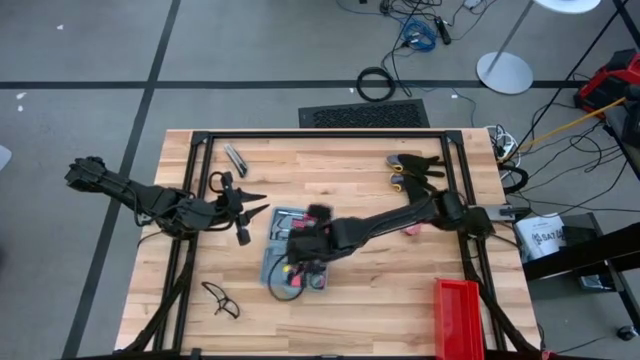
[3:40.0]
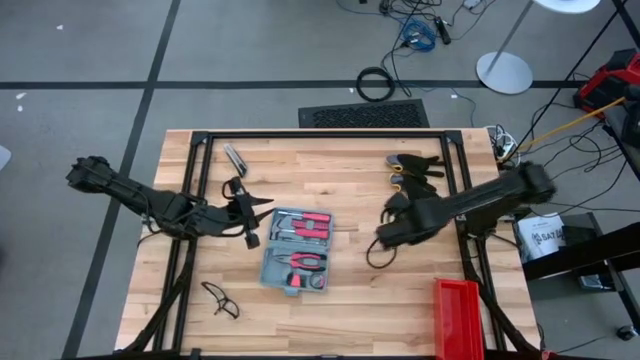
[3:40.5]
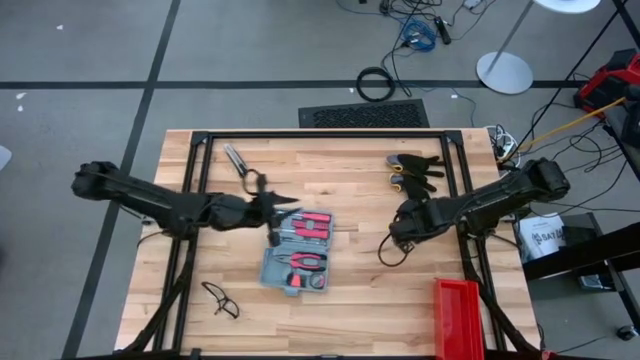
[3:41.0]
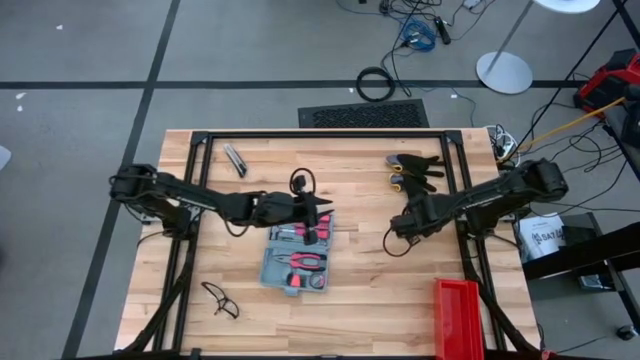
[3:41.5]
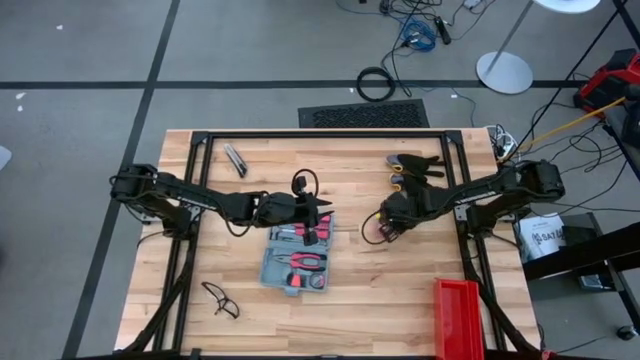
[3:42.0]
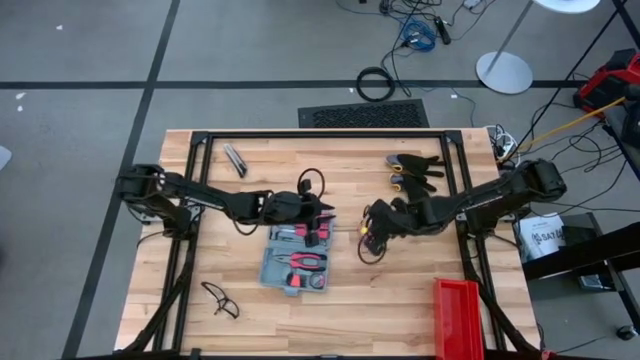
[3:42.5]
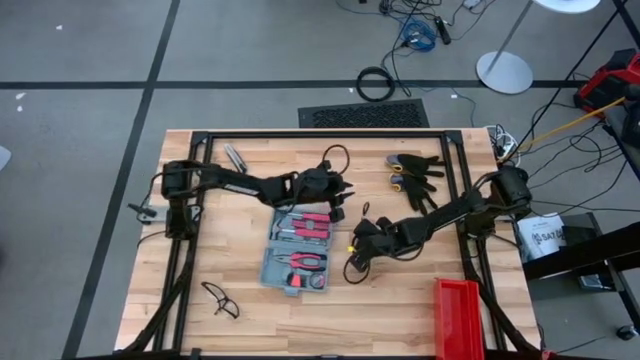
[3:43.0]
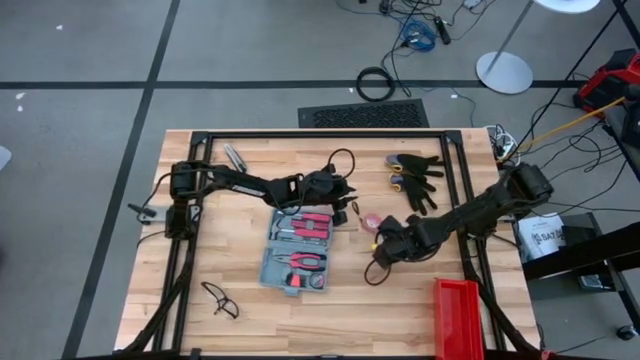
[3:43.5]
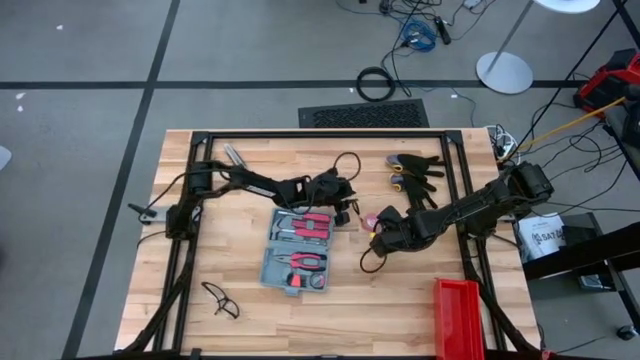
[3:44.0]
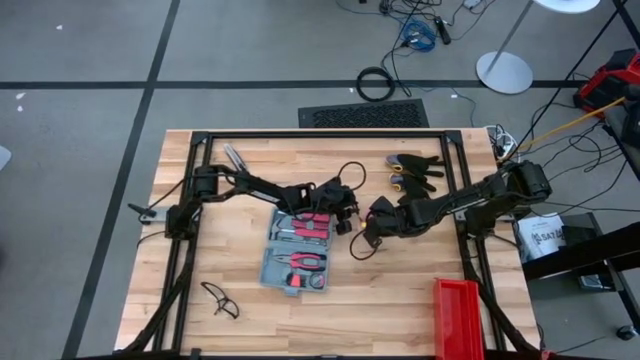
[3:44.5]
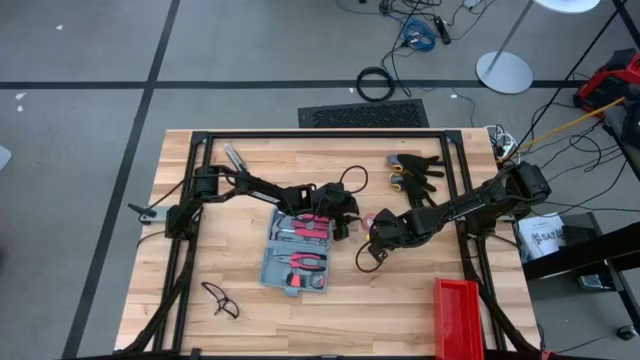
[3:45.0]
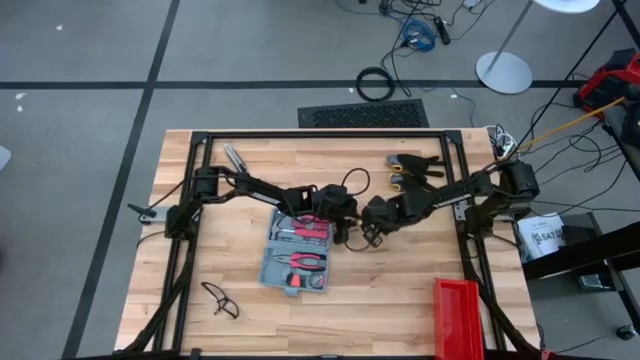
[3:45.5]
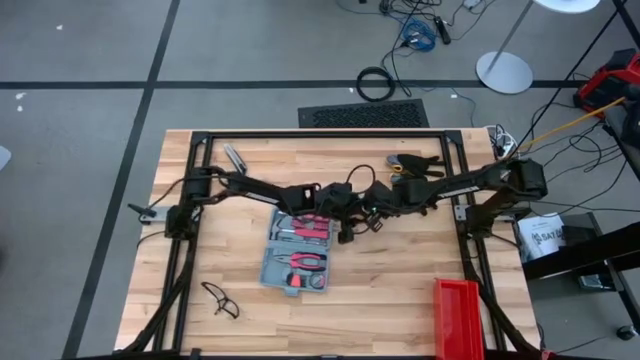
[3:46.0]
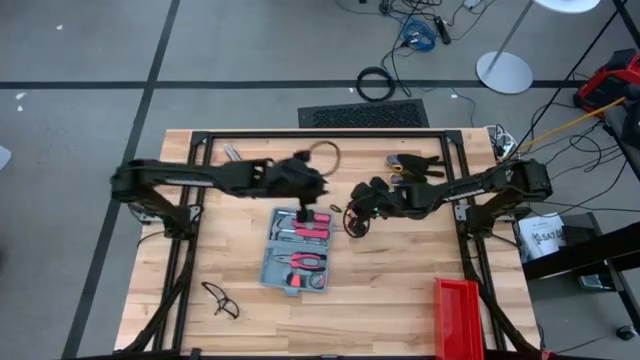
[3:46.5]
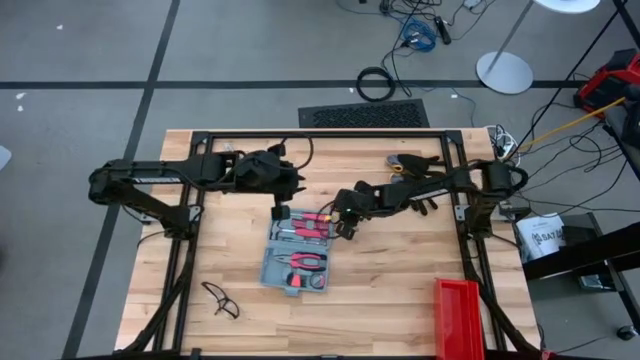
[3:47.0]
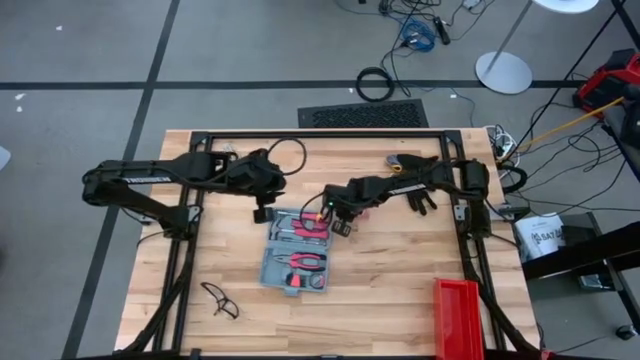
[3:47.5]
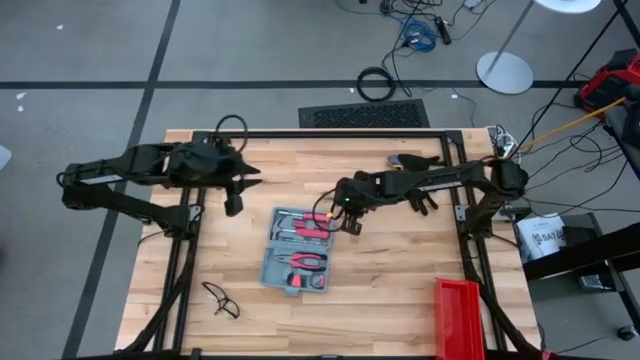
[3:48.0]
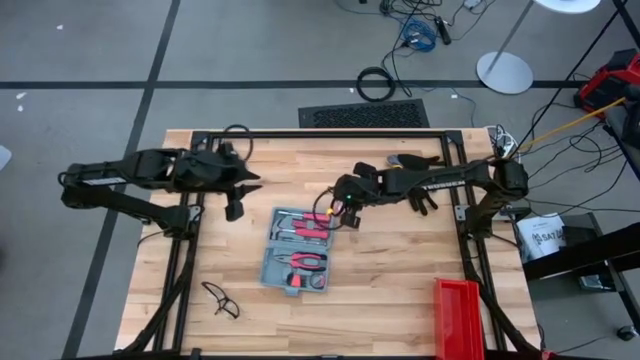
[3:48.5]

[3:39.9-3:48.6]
Task: prefit tool cases
Put the pink tape measure into the gray prefit tool case

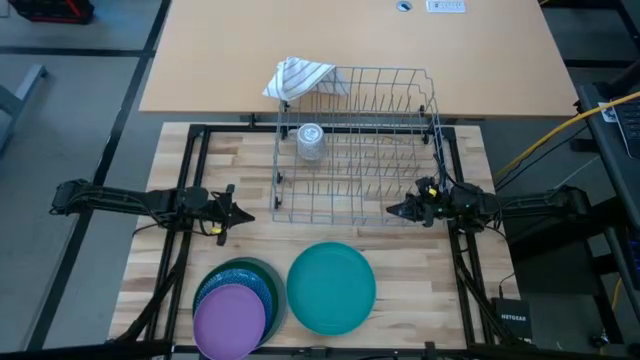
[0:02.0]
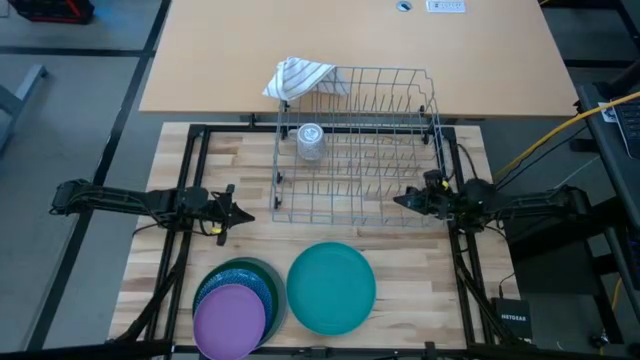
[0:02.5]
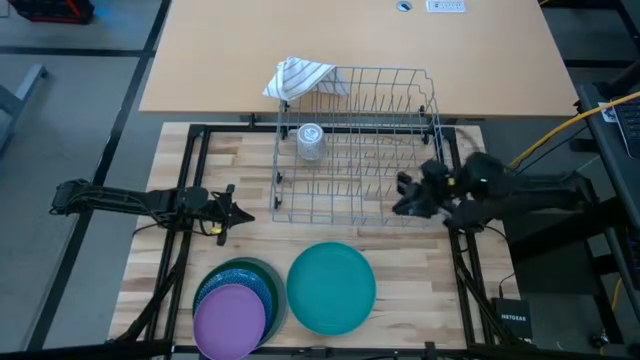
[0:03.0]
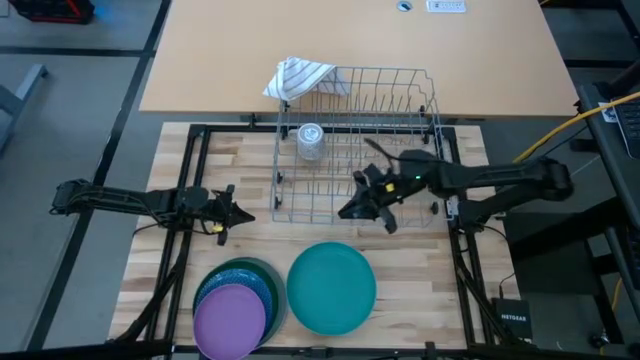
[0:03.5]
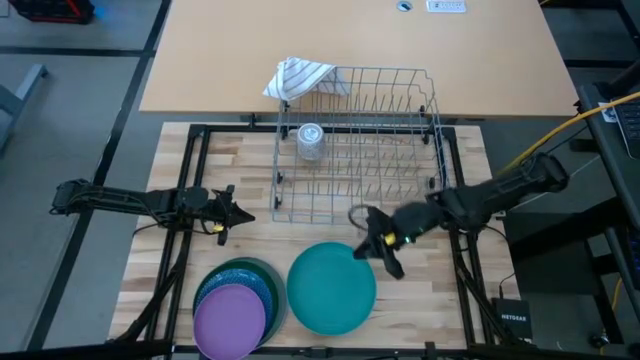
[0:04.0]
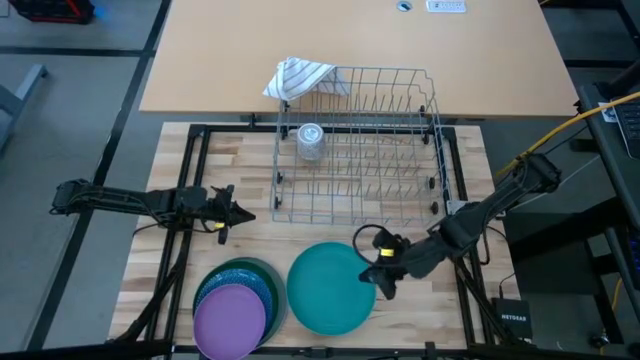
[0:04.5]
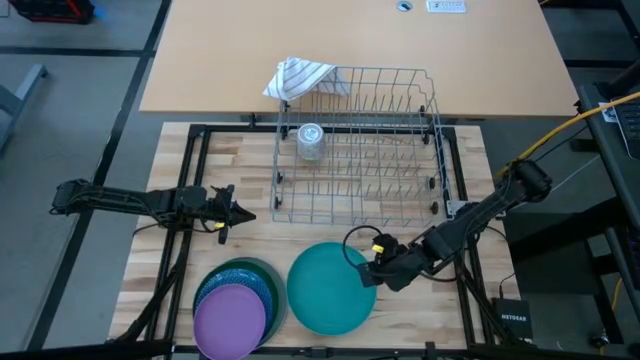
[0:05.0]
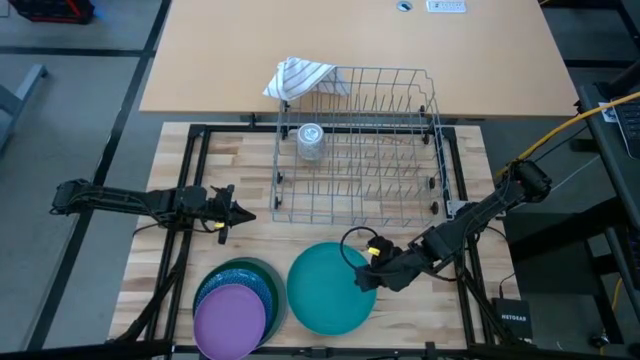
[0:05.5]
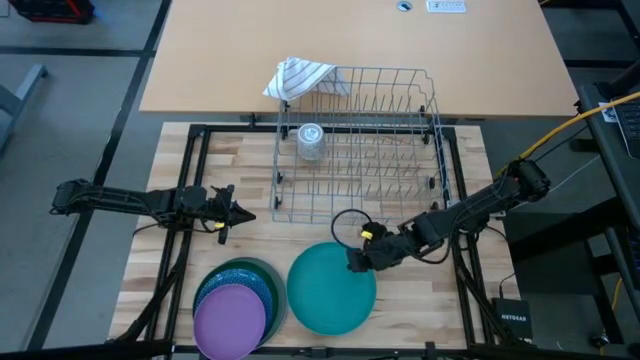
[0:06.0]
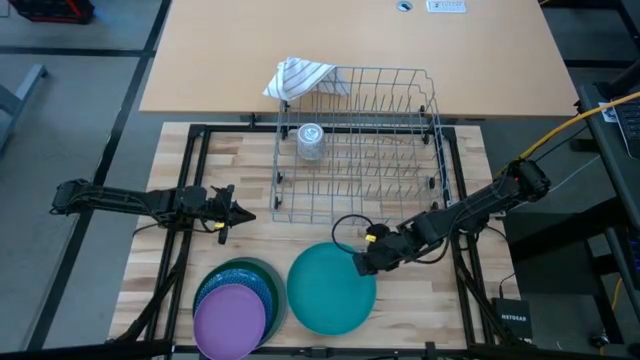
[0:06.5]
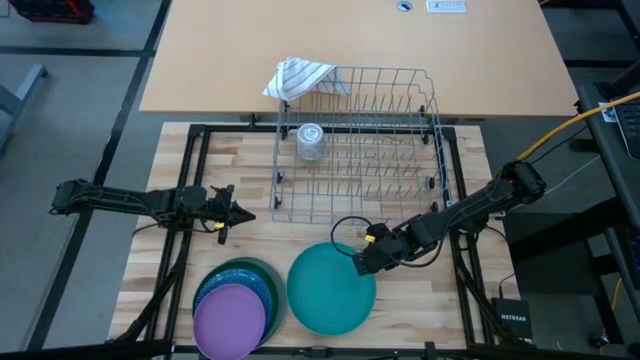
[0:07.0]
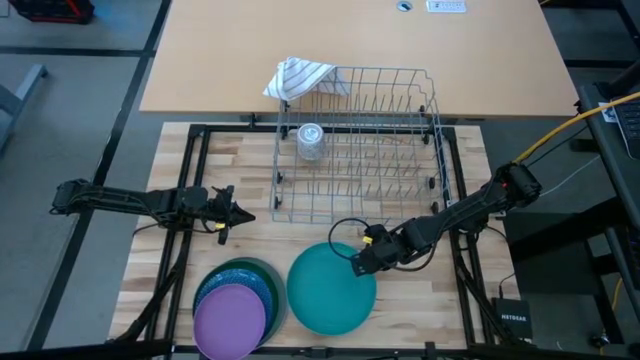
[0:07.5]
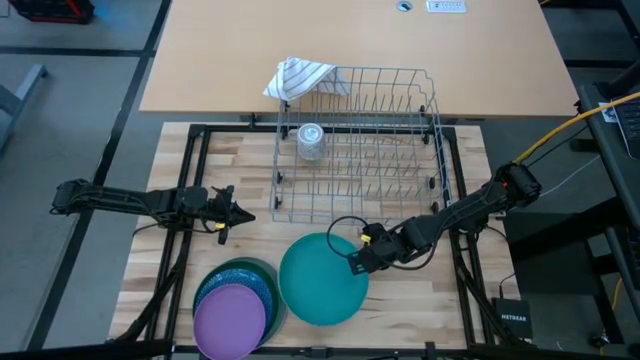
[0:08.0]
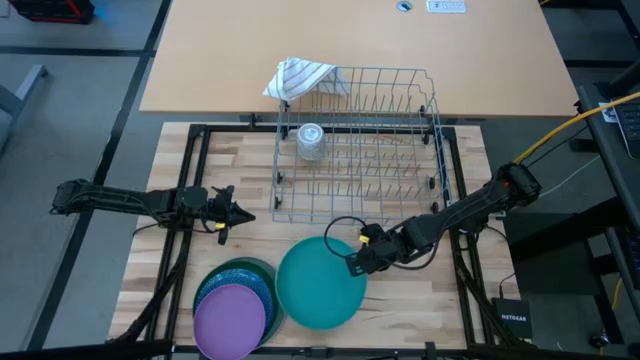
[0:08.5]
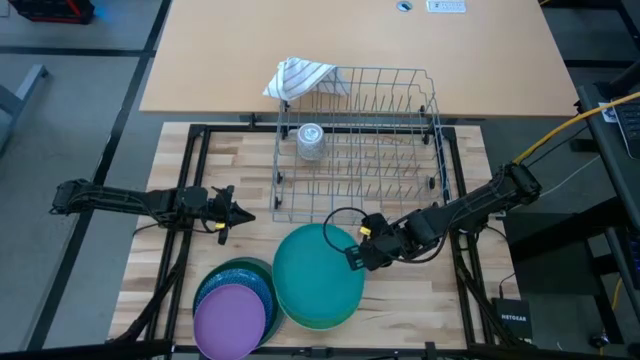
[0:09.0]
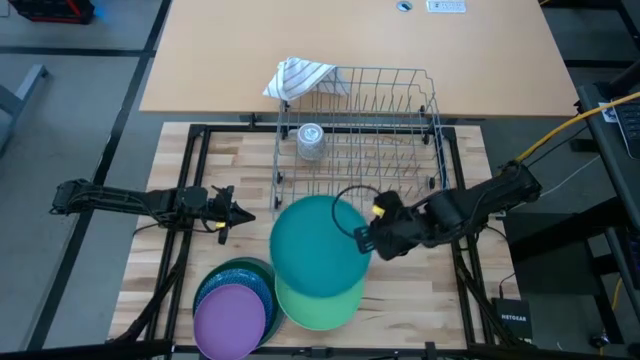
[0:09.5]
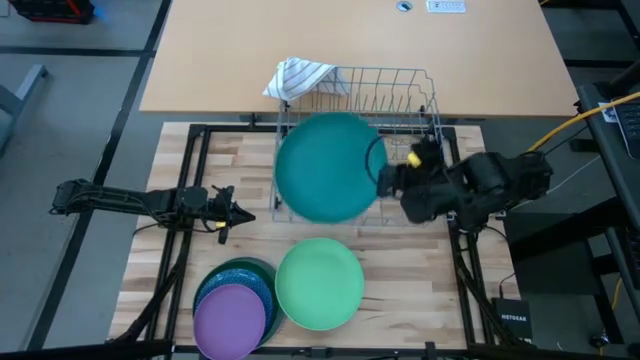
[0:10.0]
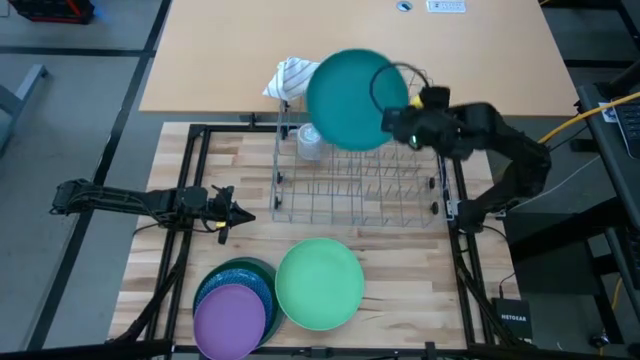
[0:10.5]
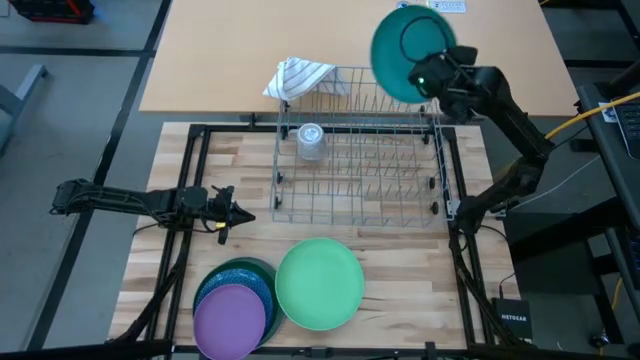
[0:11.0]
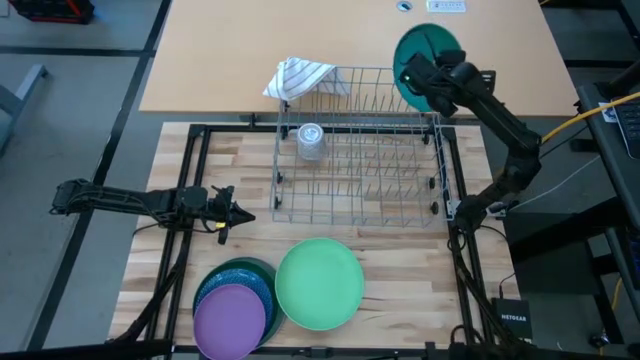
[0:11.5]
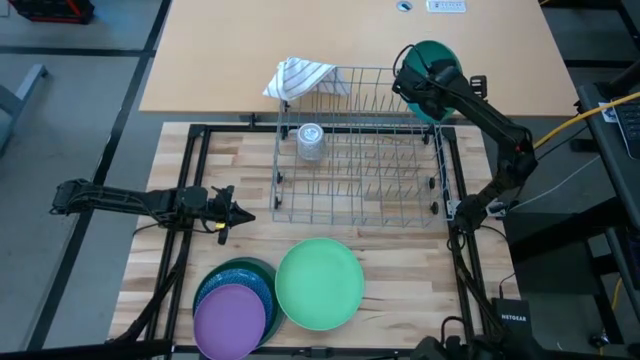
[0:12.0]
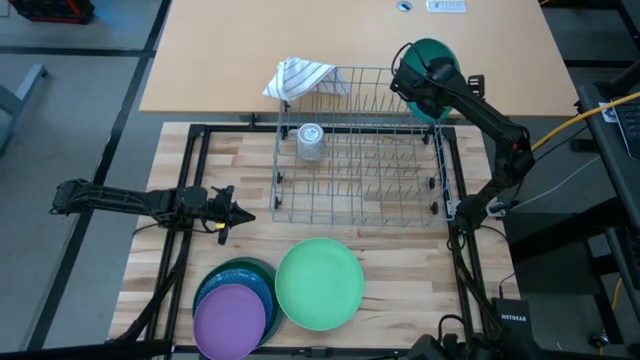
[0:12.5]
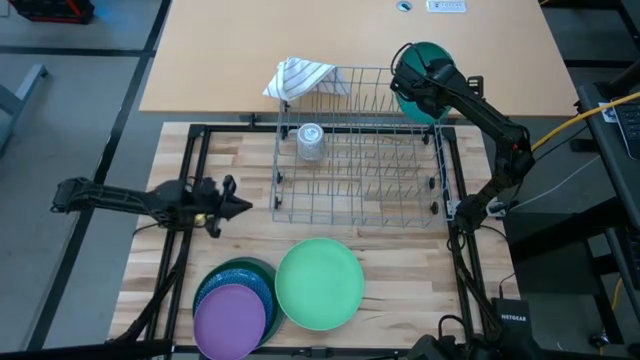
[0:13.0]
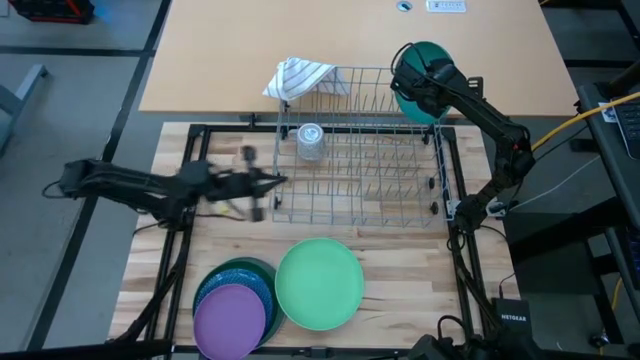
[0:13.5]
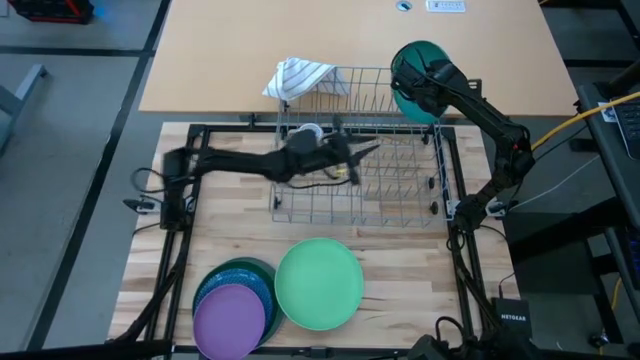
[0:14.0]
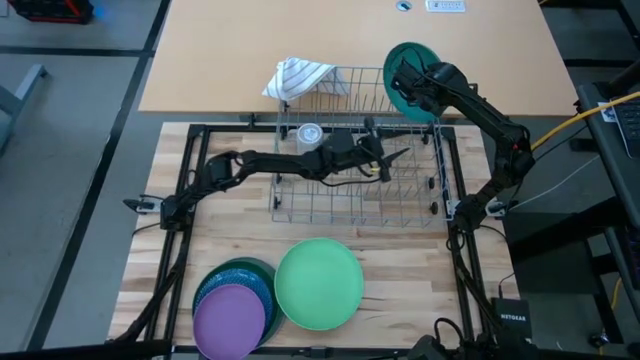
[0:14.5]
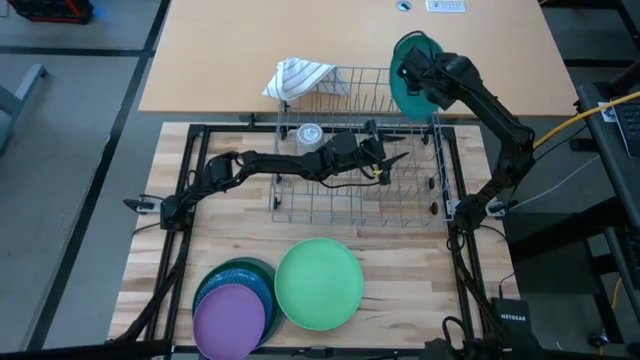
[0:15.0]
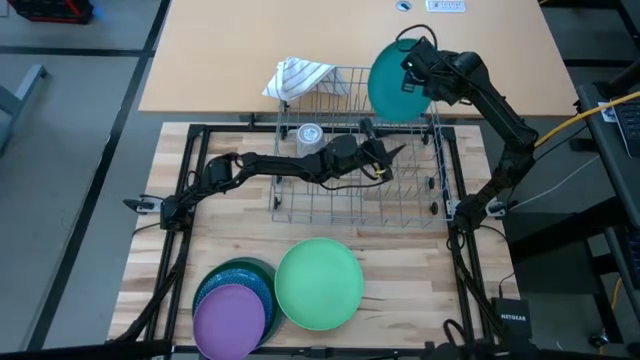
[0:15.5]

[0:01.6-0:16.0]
Task: Sort dishes
Put the blue plate in the dishwasher rack
